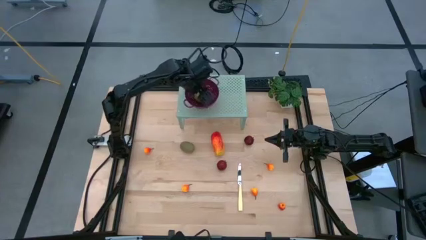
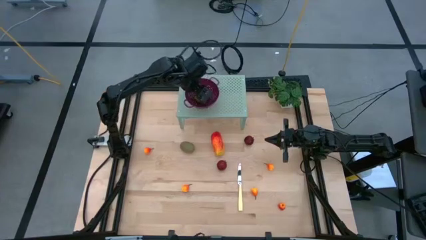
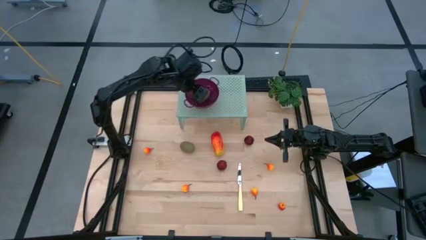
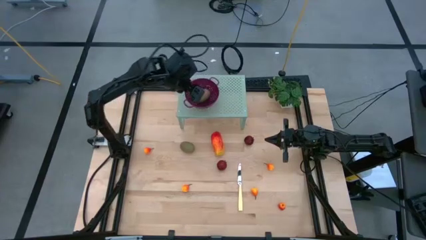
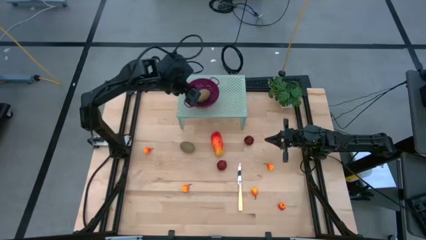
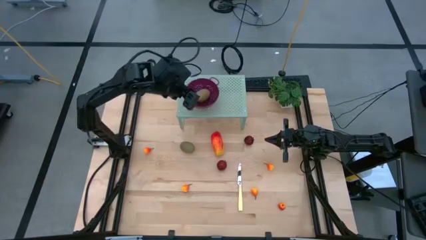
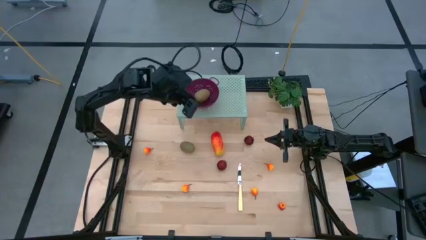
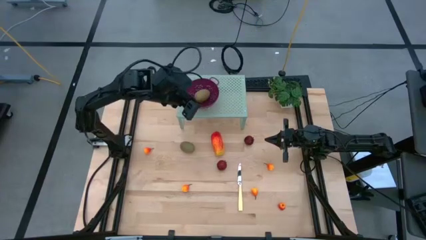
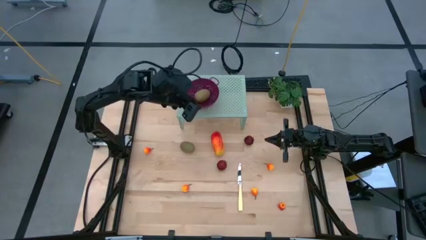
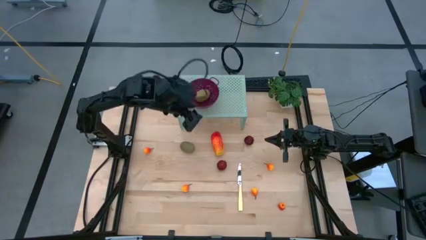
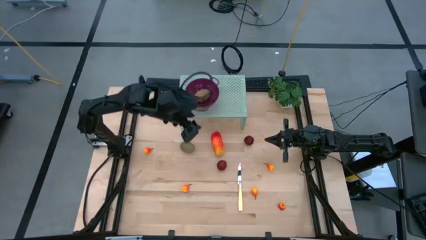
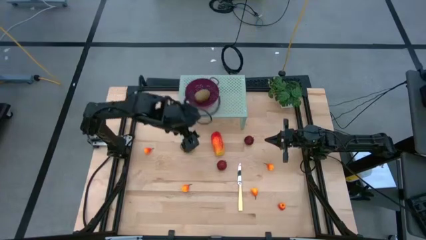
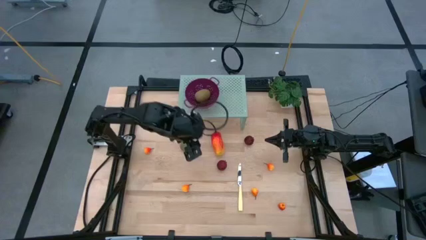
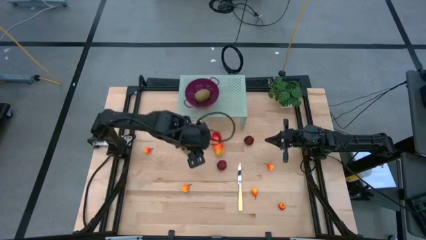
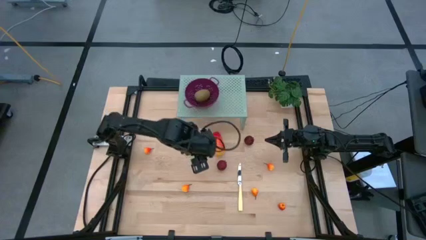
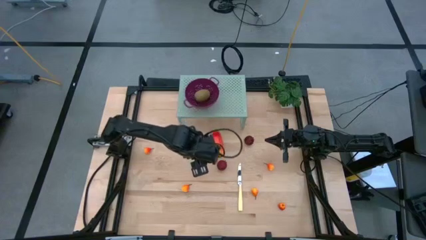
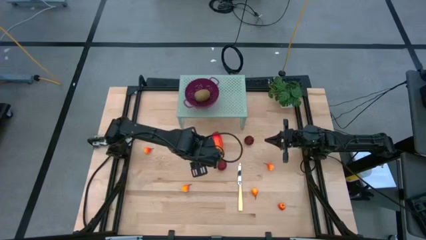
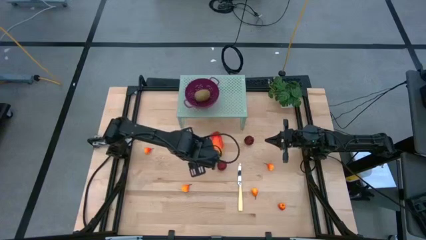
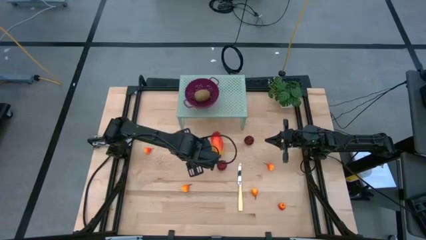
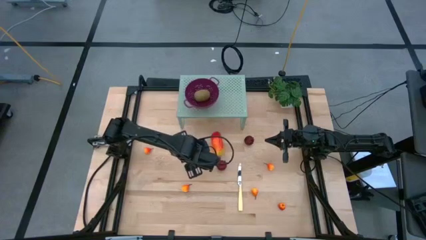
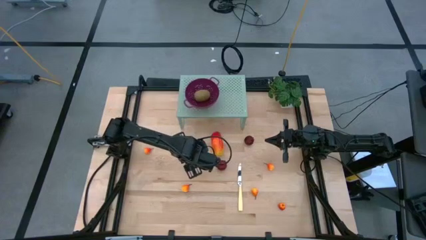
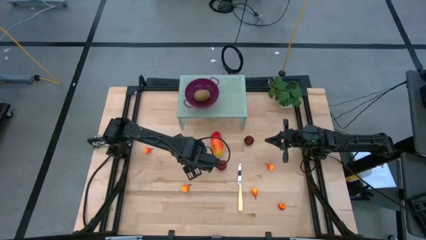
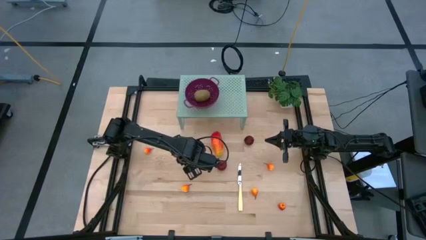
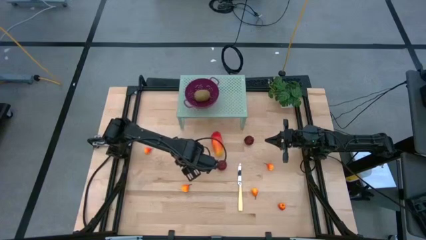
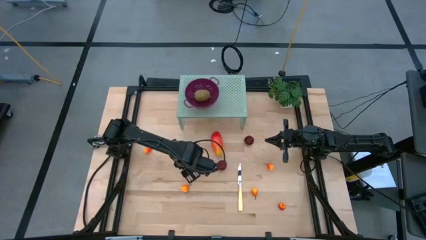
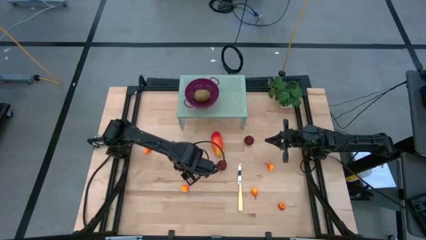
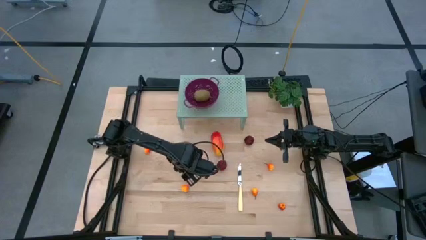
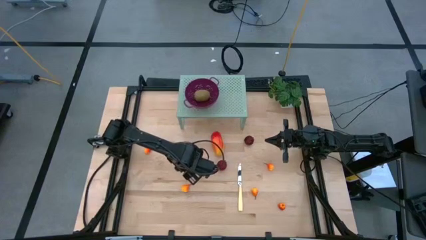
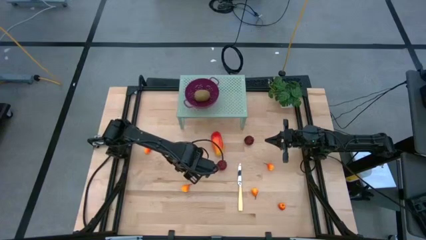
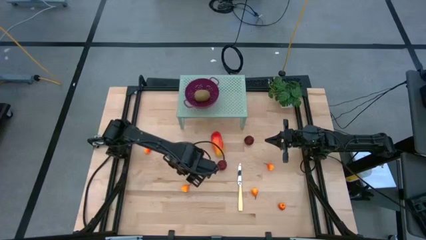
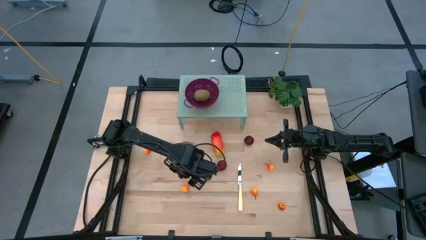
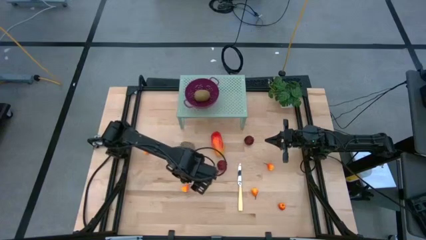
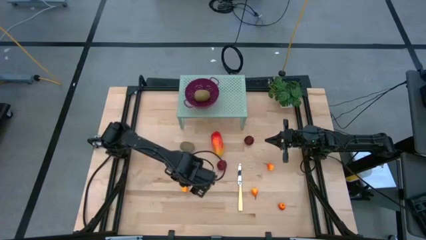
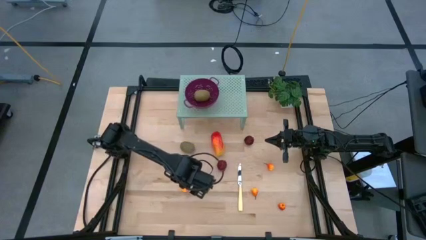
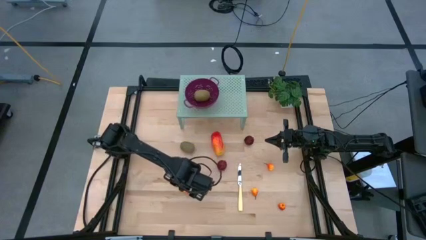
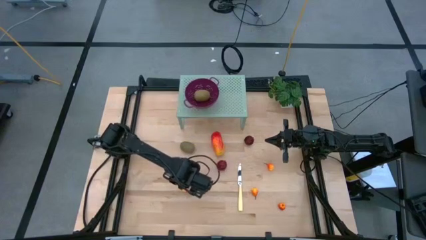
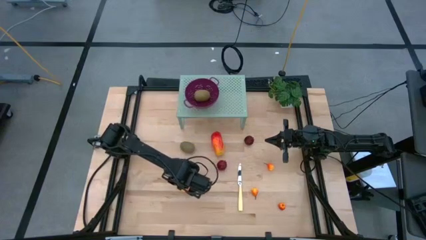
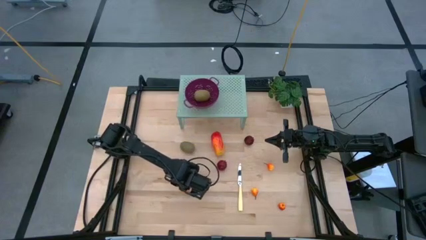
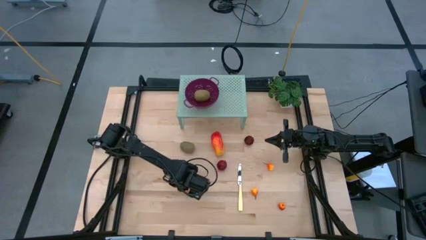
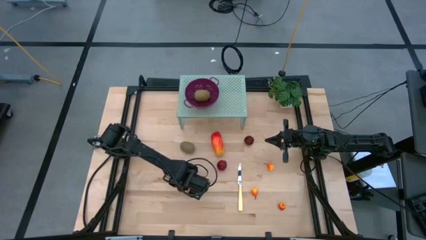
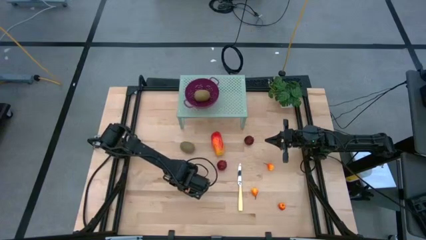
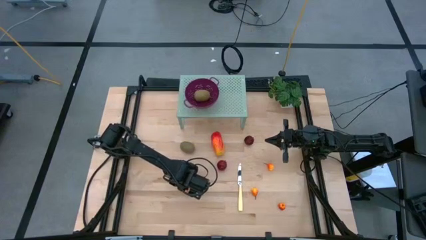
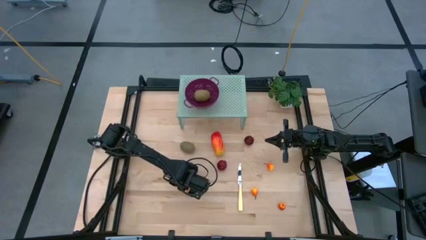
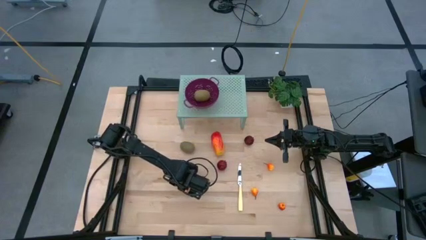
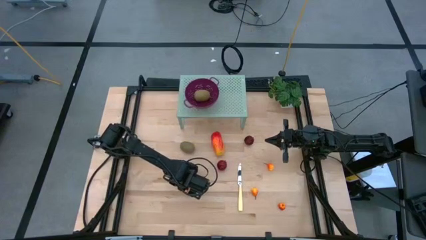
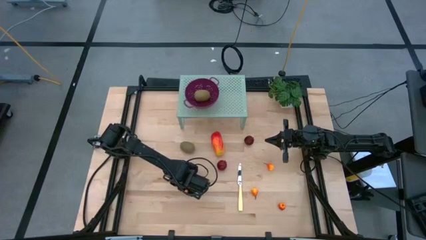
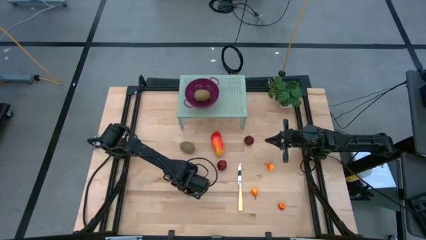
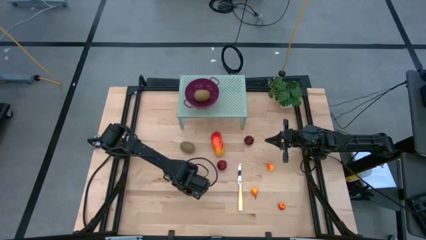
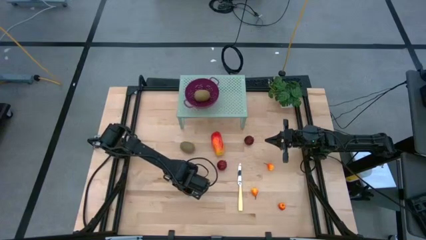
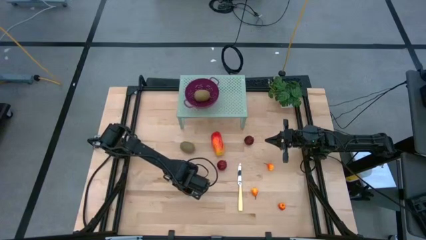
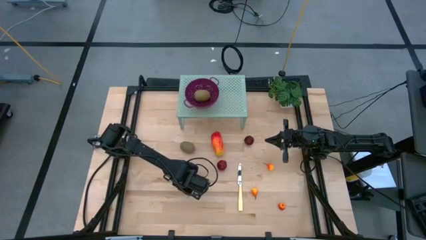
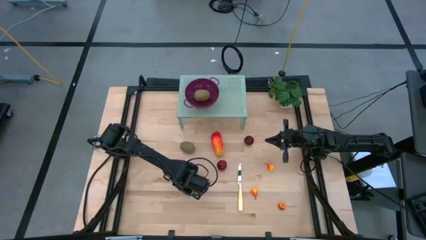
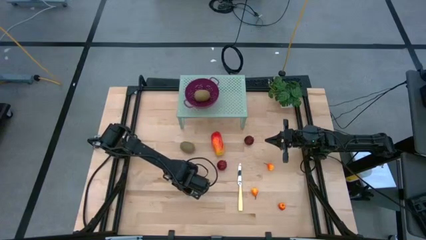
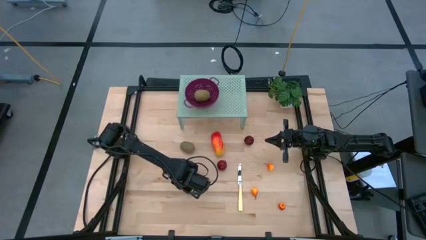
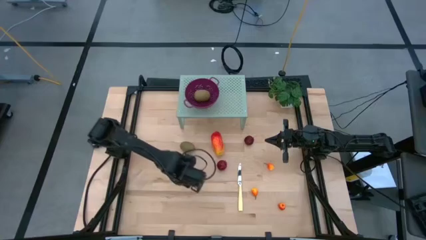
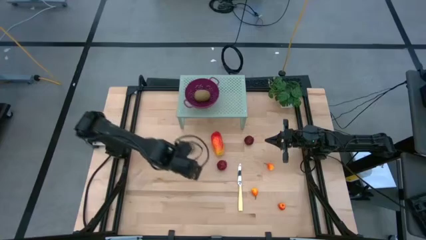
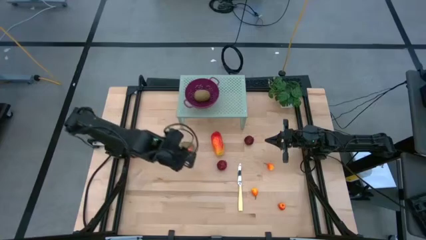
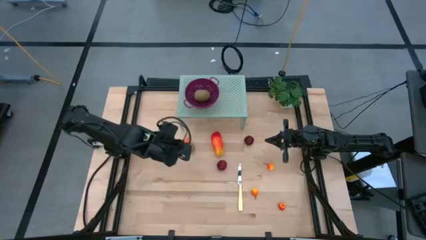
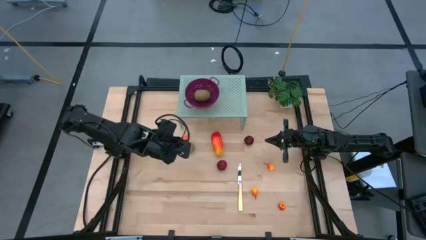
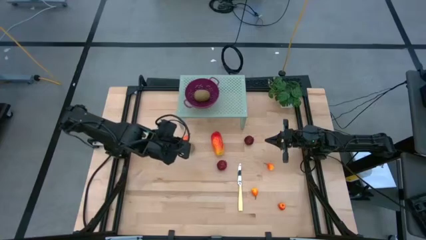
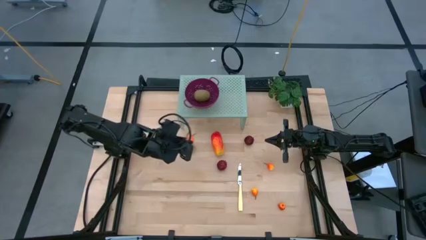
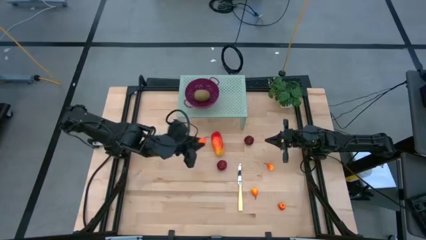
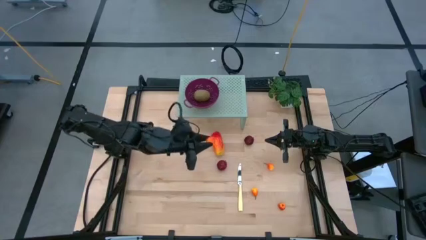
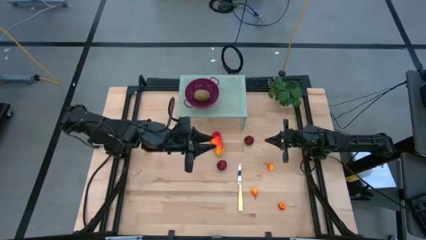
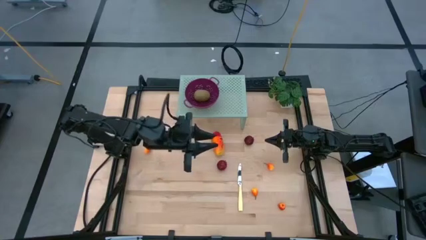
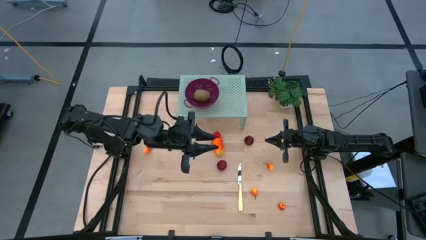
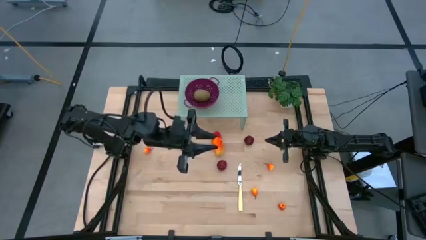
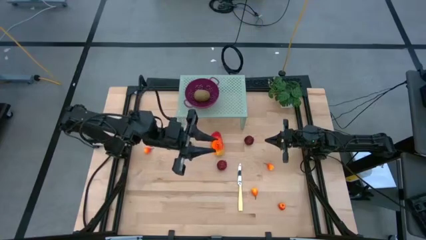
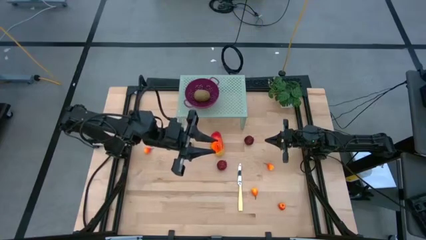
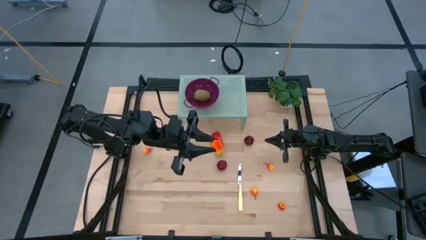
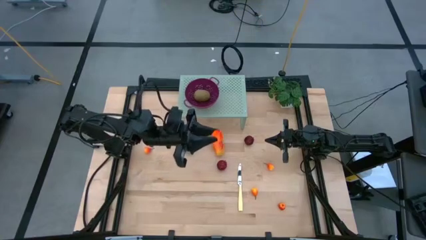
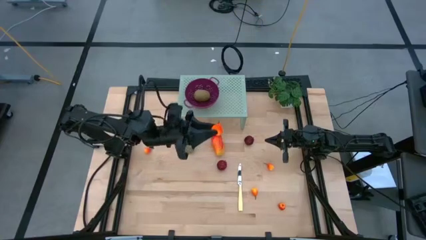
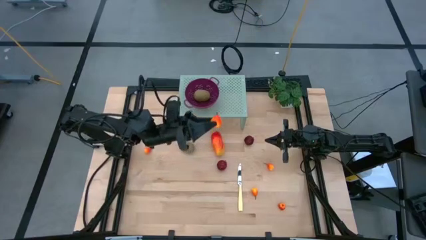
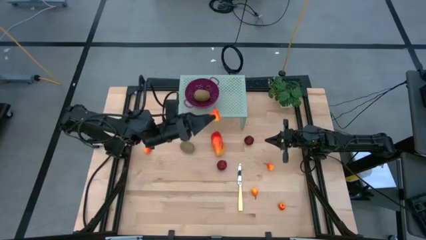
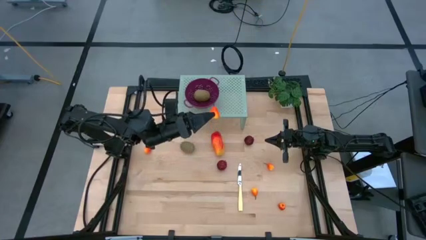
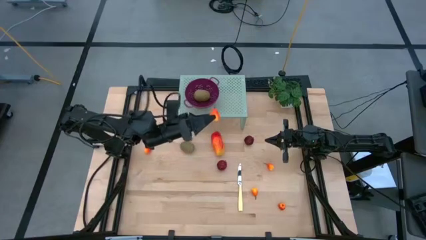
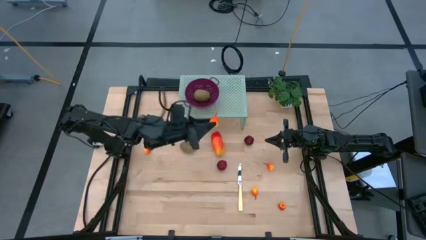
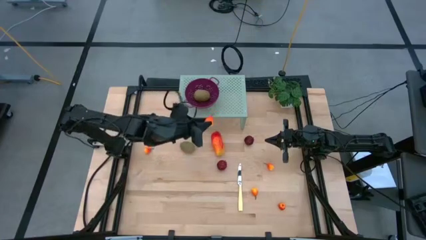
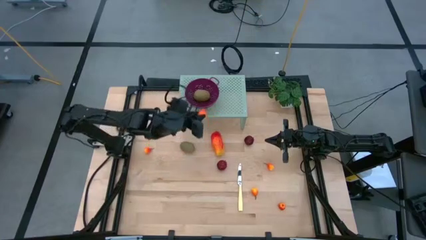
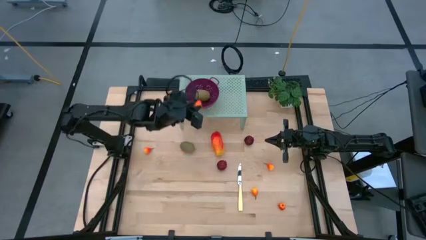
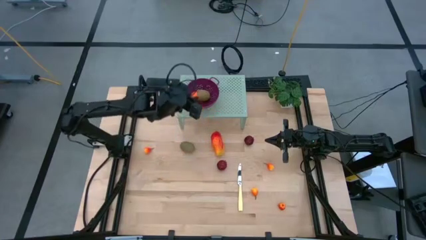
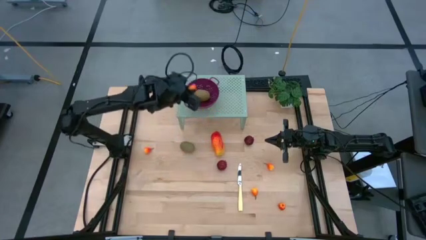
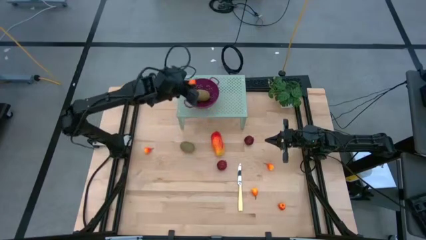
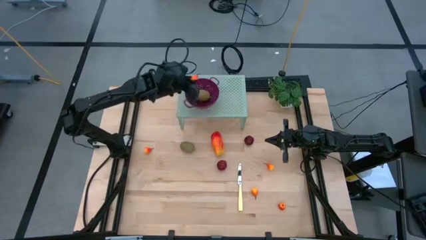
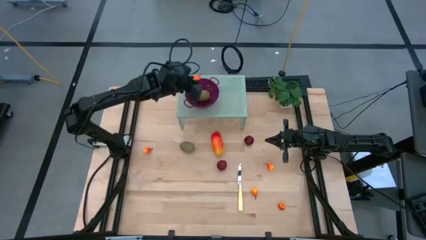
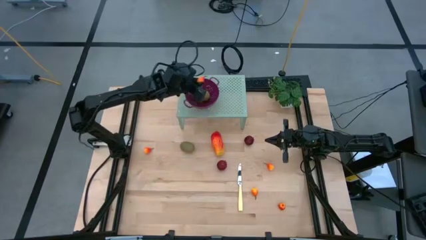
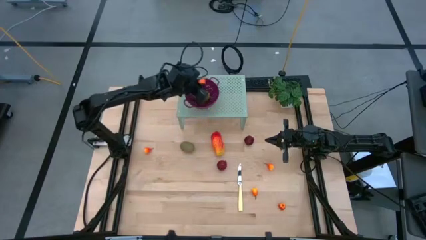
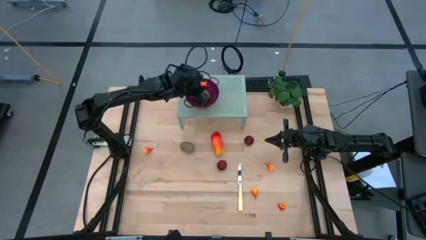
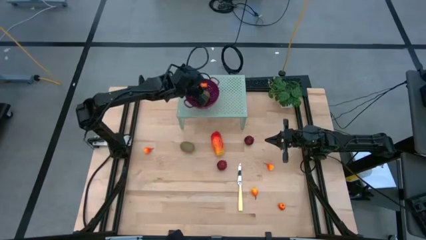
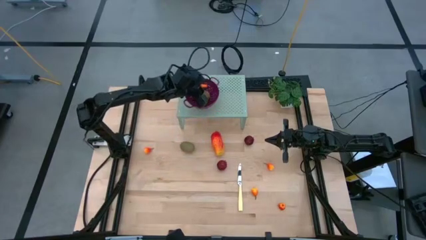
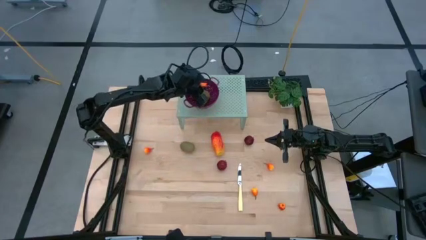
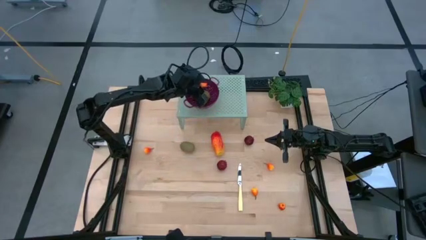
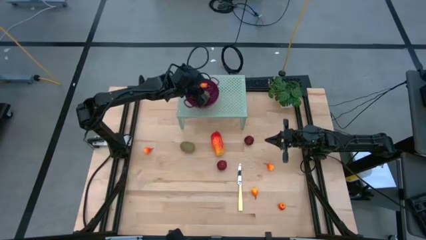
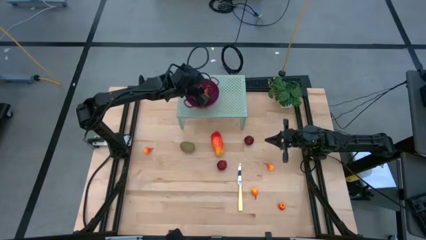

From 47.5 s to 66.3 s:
Task: Pick & Place Fruit
Put the pear into violet strainer bowl on the shelf
